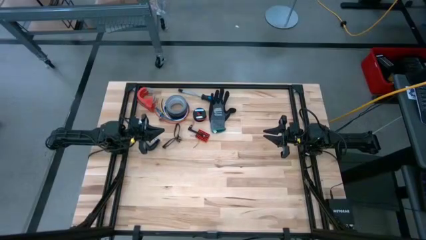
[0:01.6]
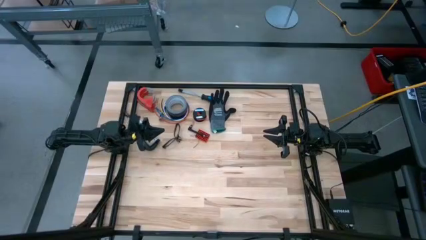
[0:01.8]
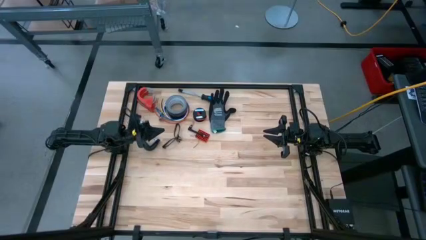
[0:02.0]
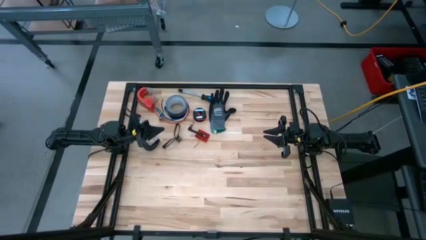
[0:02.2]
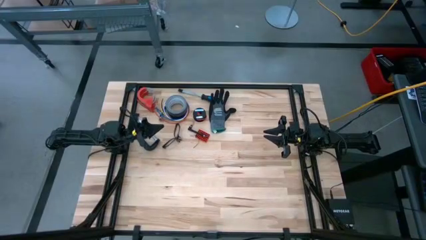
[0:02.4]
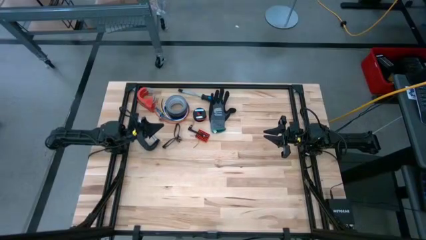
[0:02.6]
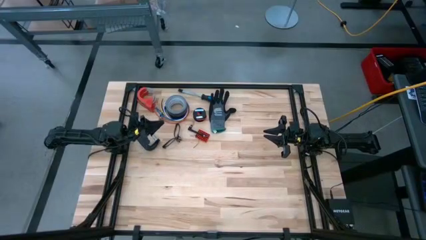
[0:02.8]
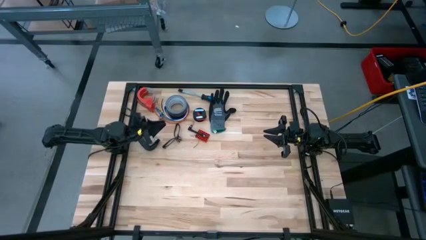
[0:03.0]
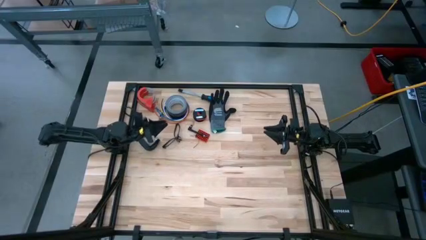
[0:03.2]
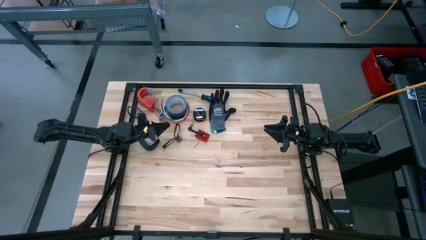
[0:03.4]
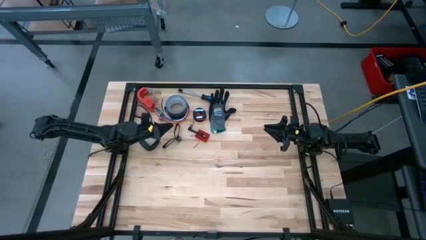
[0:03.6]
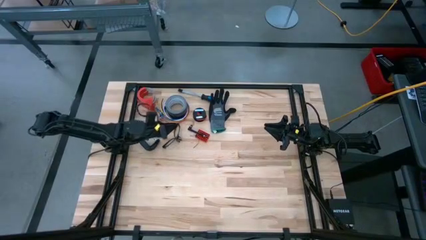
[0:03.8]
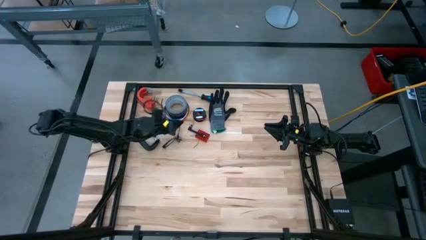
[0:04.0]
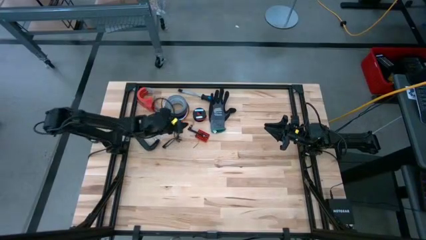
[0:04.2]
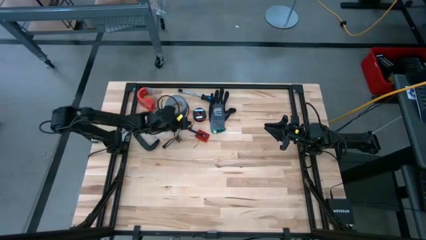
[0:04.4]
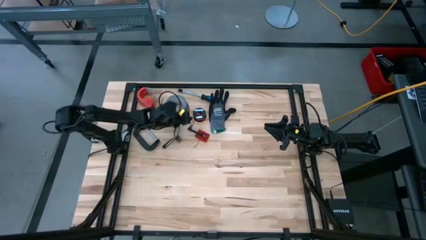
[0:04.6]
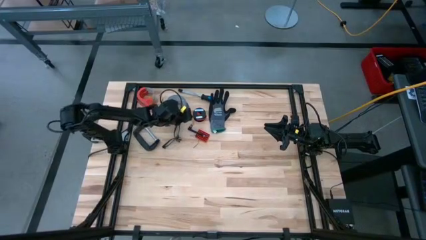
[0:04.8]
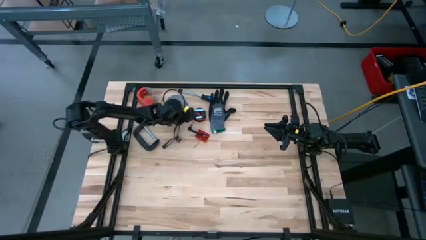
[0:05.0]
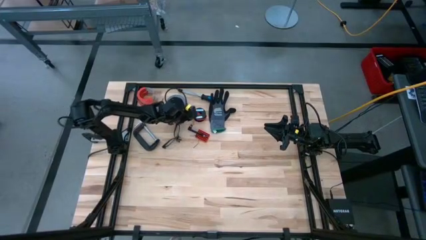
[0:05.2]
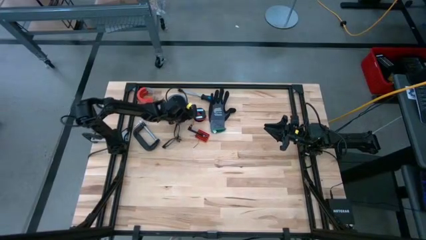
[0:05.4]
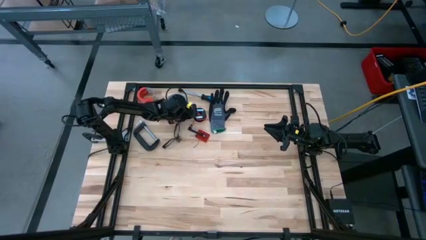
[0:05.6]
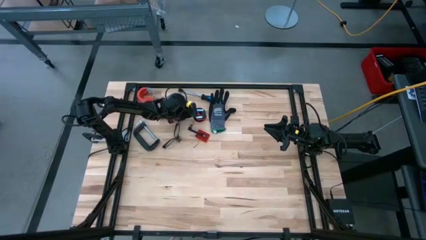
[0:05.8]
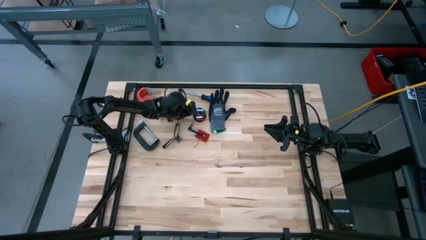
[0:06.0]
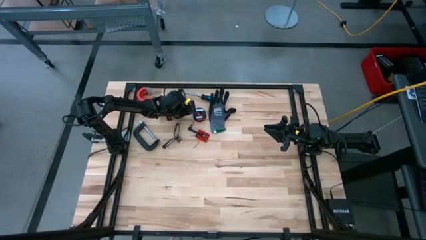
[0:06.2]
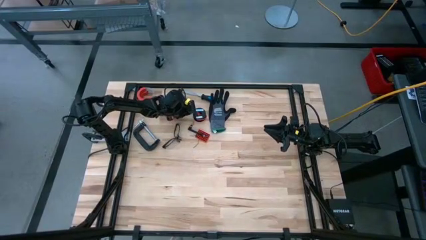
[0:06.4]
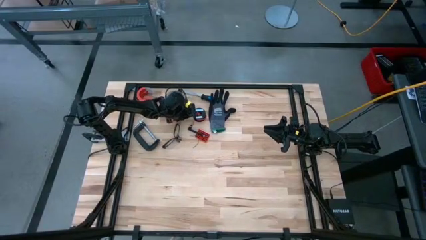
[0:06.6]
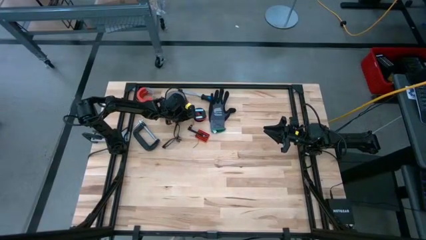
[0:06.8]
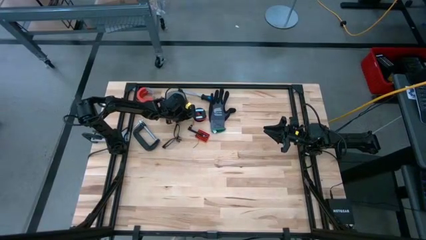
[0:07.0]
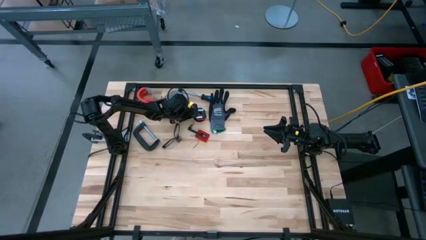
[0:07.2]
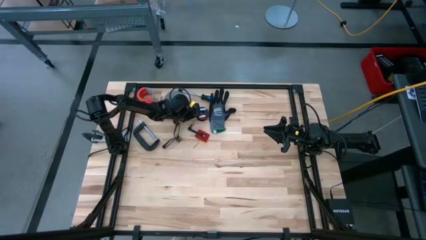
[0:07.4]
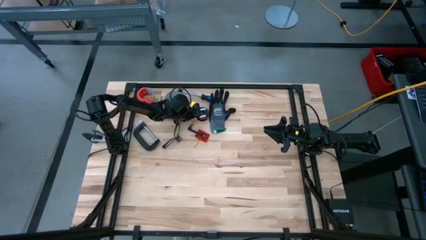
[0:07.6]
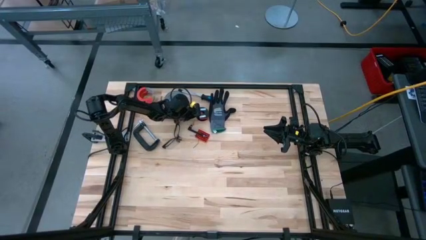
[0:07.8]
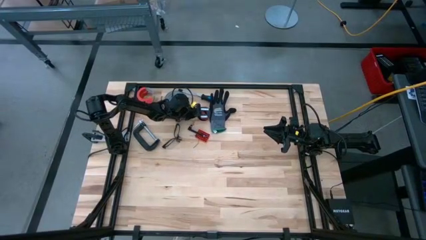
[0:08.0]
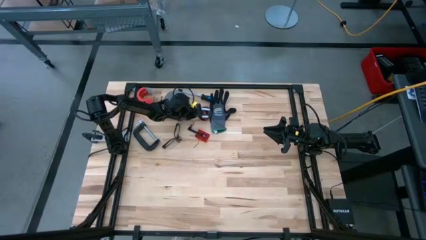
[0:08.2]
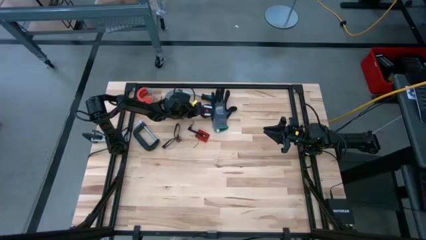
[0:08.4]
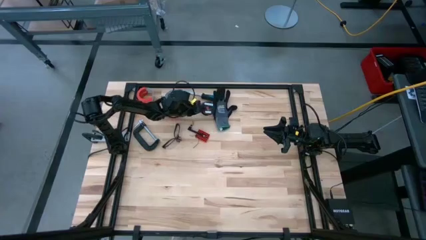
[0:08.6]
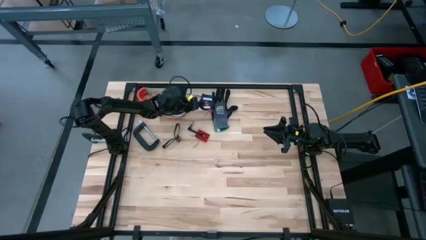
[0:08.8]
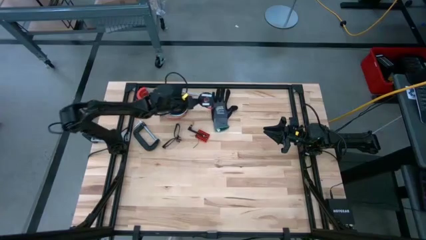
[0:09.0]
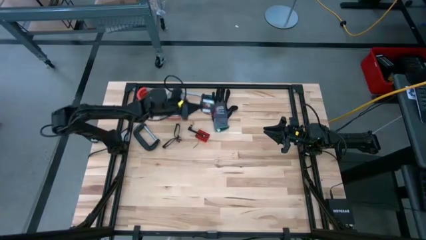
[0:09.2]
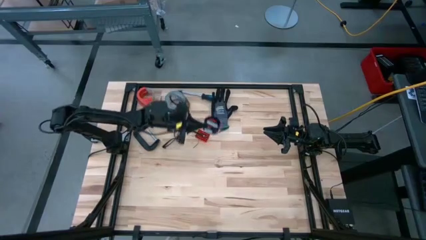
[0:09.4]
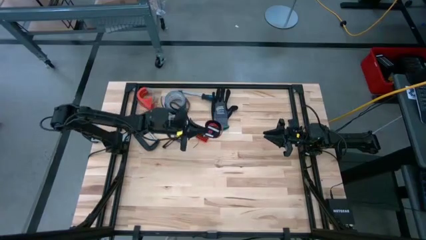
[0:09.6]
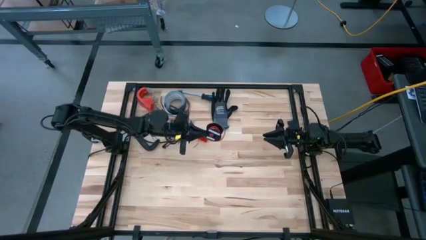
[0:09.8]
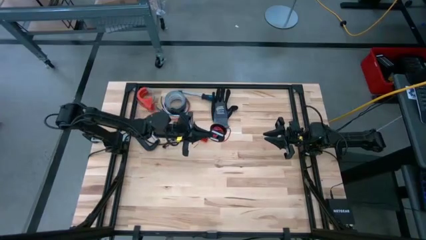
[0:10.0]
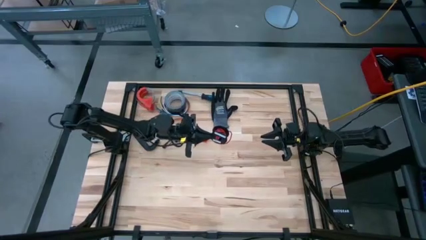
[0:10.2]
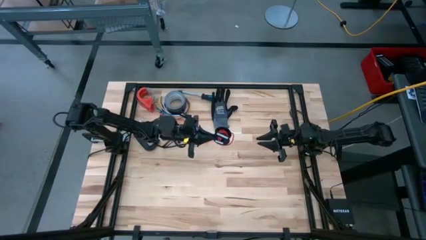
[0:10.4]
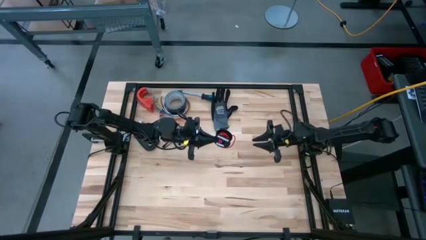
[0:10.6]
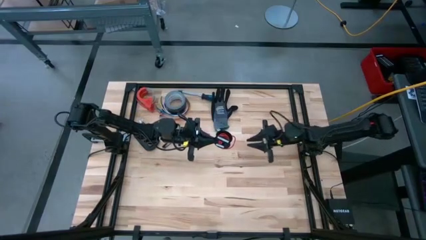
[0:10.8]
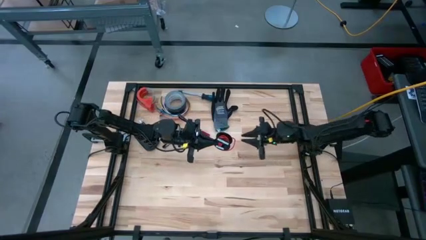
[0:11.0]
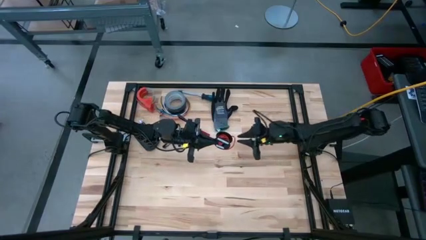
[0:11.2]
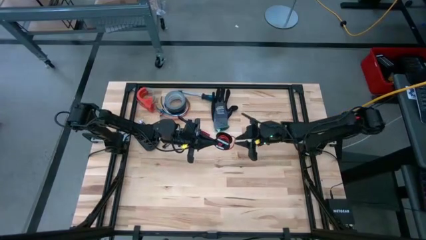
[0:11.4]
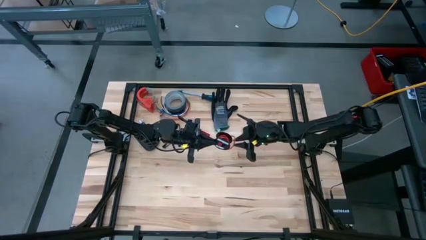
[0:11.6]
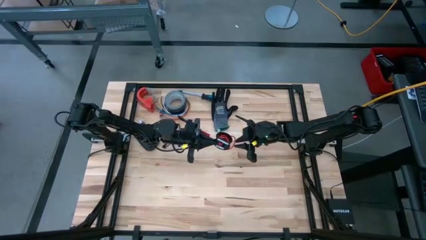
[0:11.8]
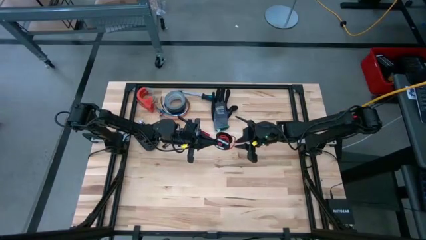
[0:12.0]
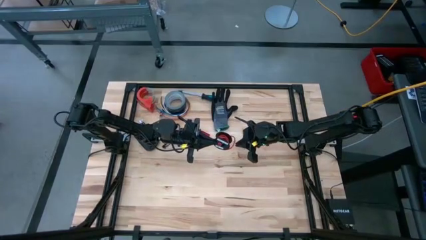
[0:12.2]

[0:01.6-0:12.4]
Task: Coil cords
Uncoil the orange wire from the black spool

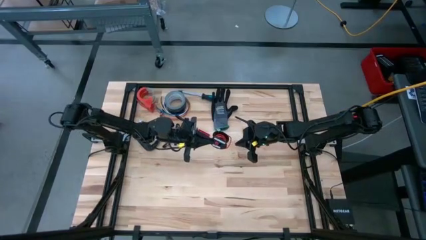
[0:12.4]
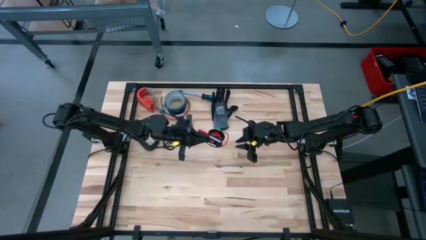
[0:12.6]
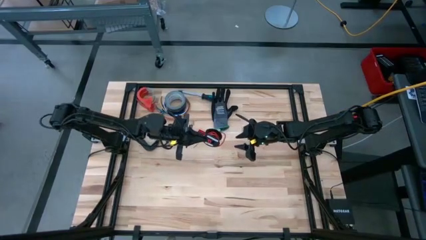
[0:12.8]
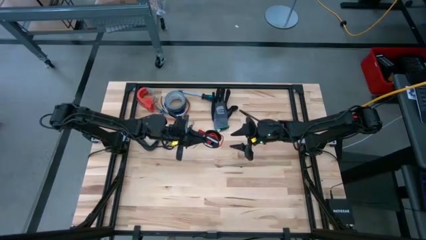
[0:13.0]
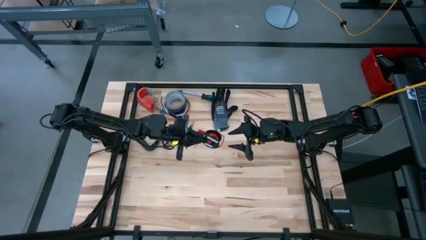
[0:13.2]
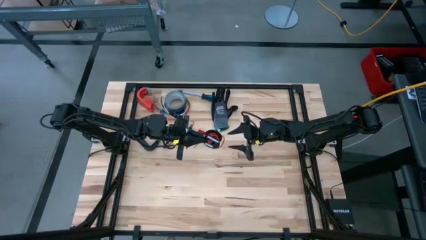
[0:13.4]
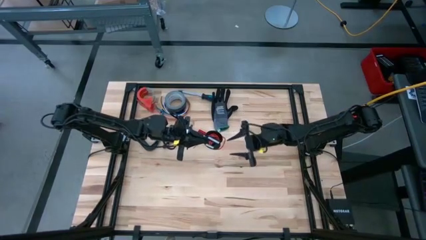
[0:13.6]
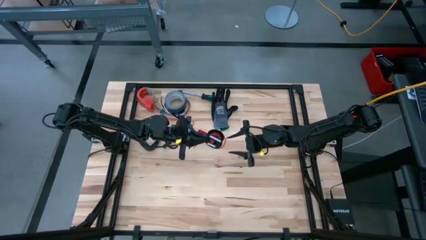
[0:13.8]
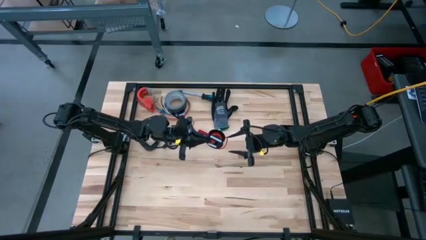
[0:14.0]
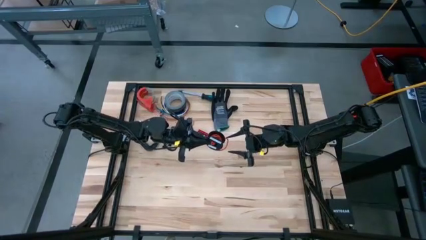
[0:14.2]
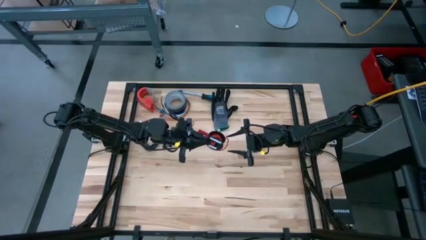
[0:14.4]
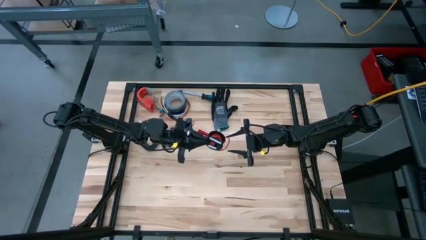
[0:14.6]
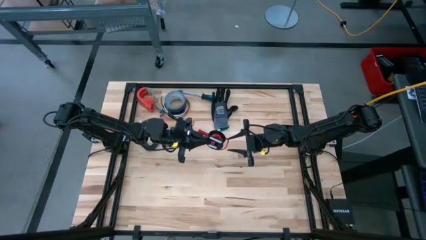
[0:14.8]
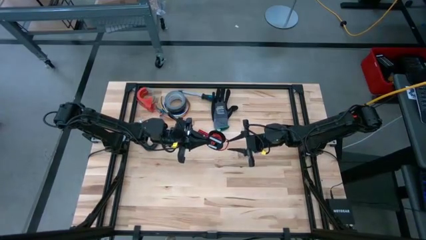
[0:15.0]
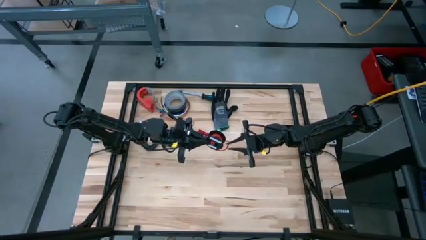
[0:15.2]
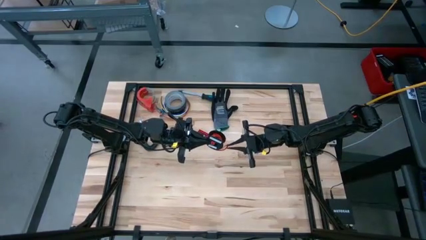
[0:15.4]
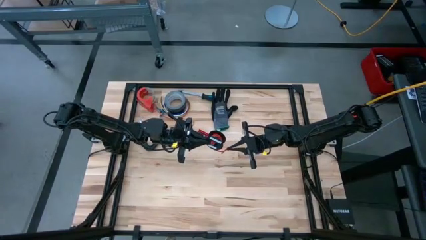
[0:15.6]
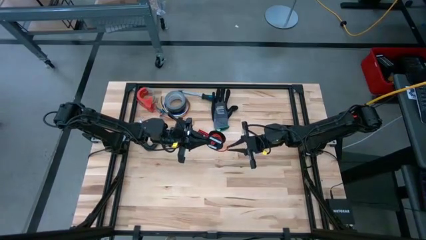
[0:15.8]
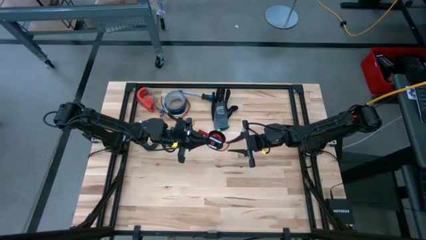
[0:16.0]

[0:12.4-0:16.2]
Uncoil the orange wire from the black spool
